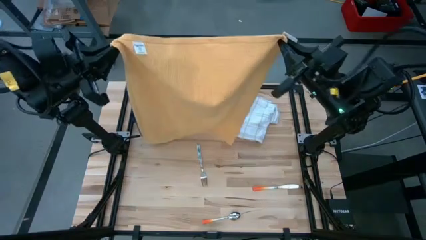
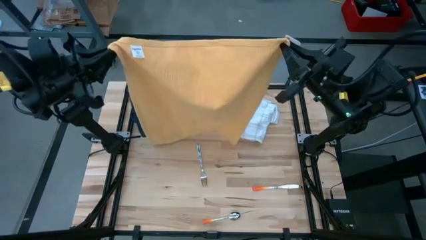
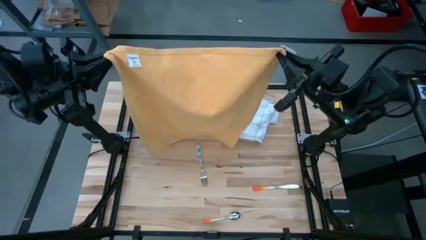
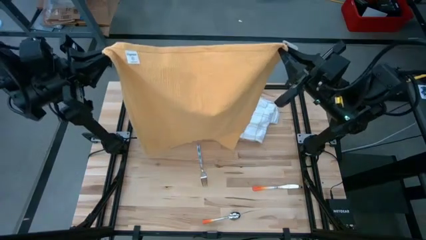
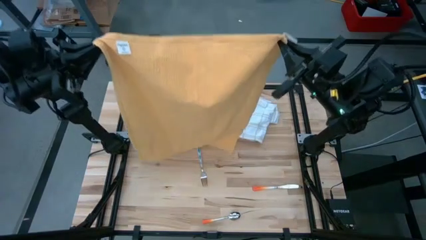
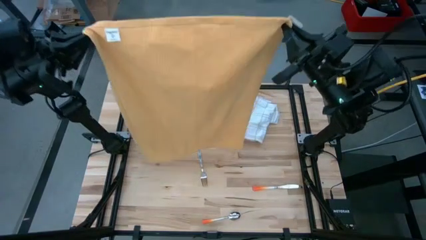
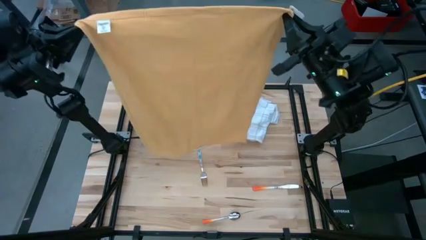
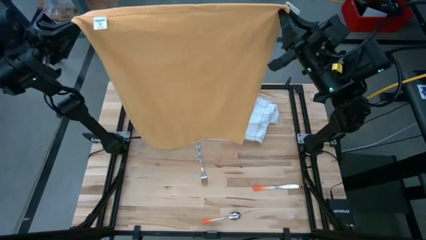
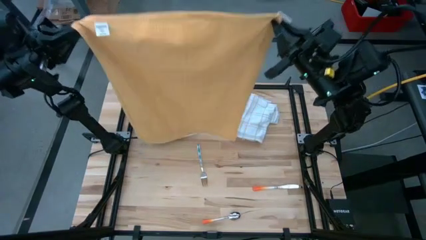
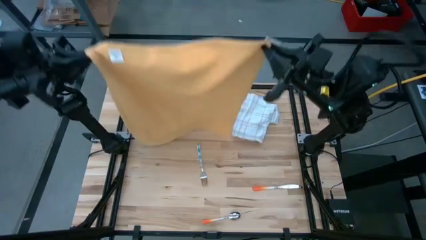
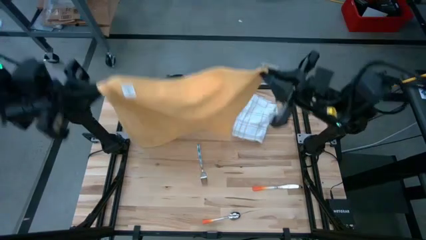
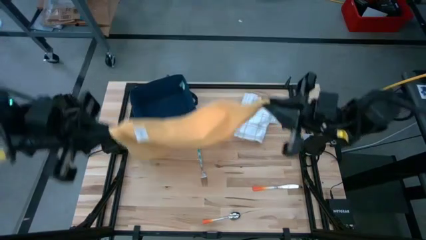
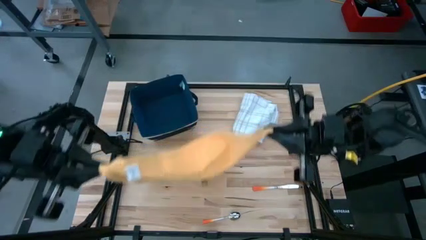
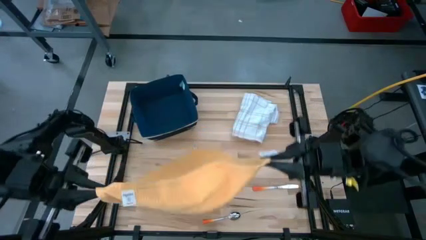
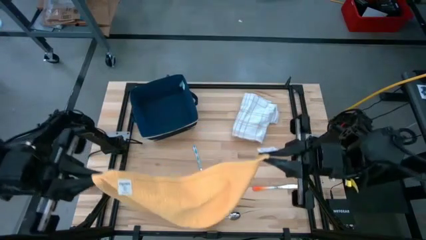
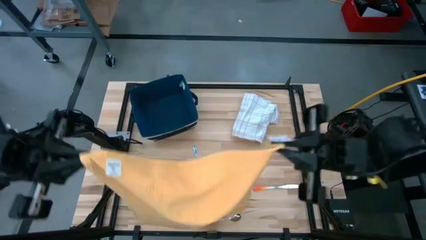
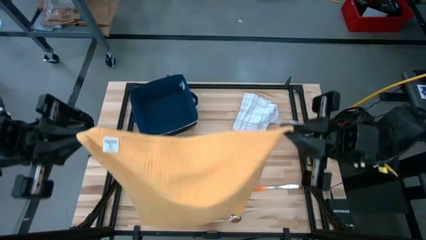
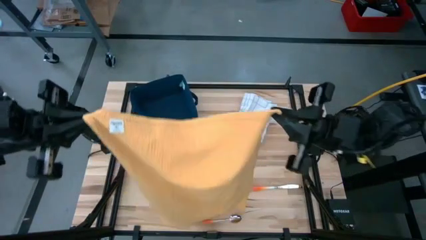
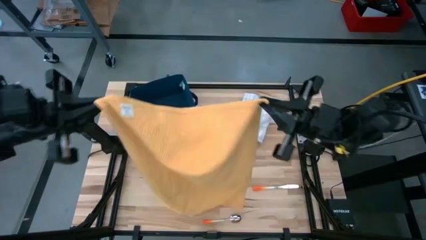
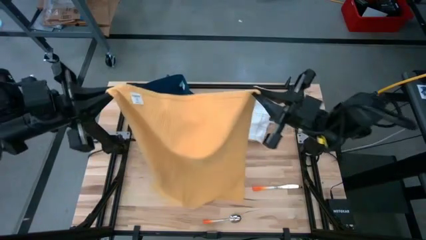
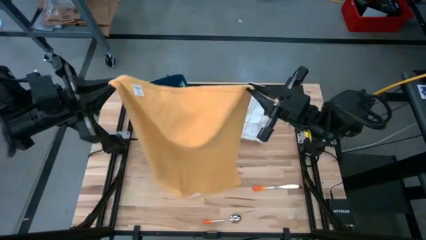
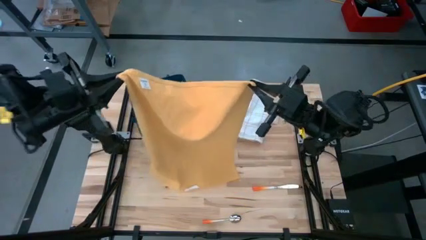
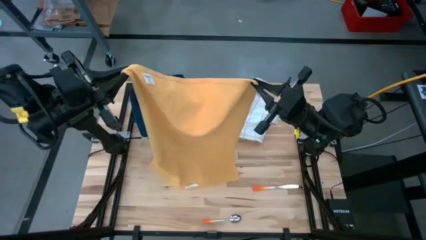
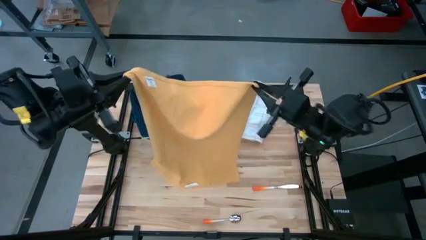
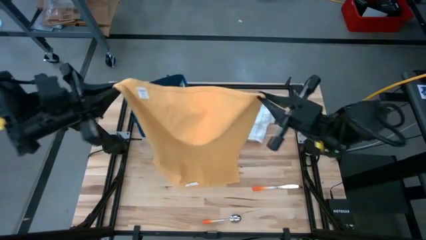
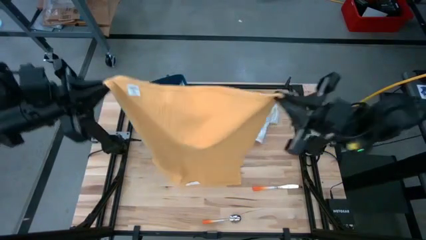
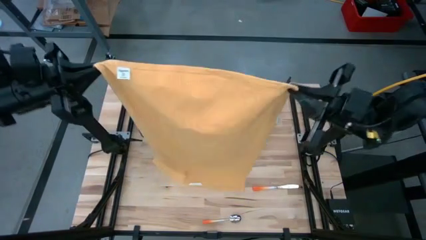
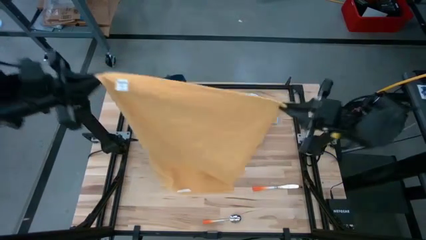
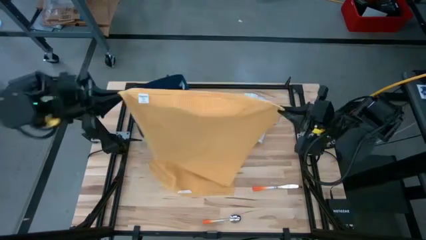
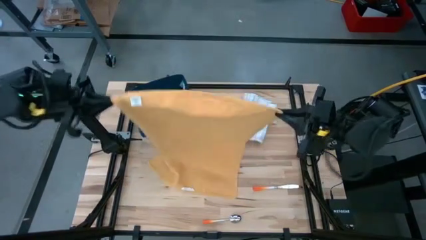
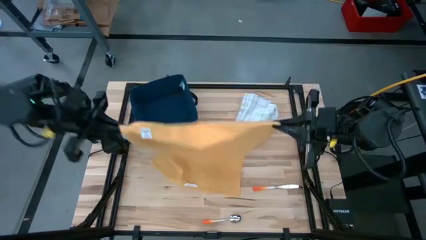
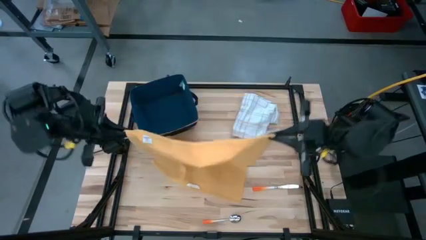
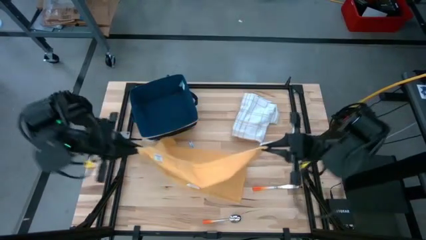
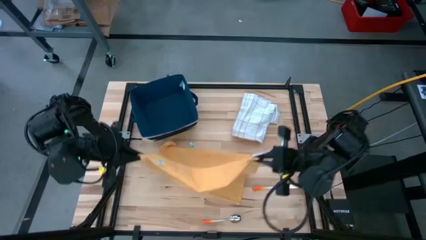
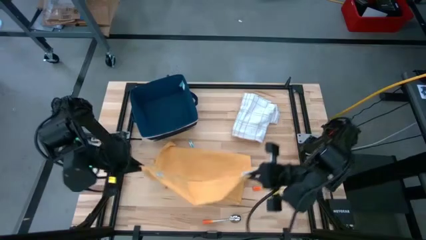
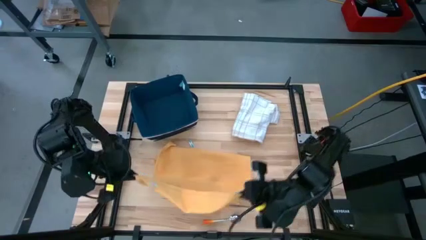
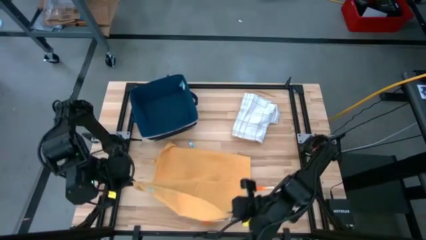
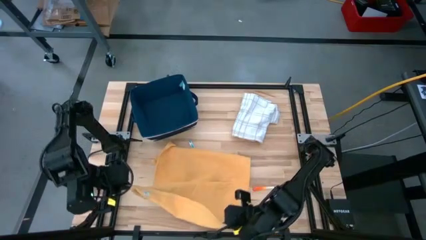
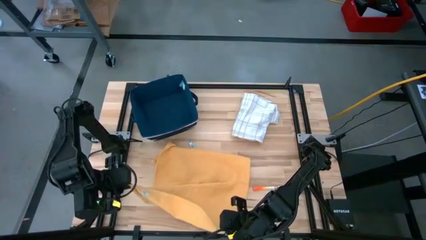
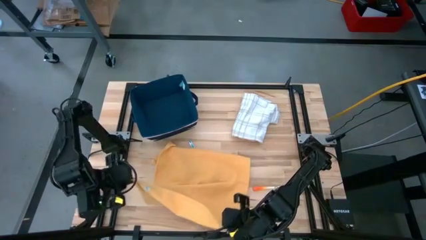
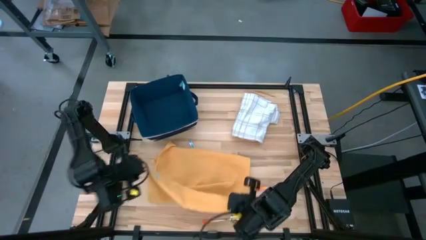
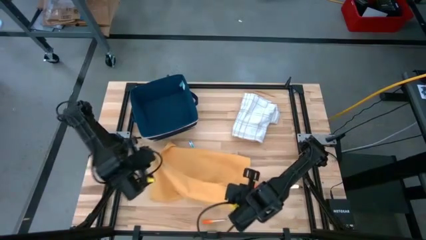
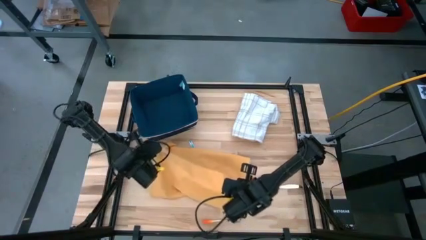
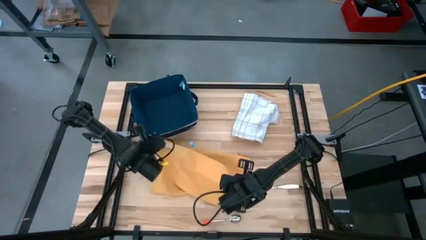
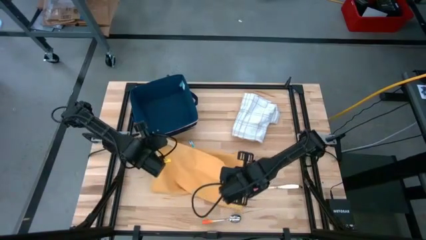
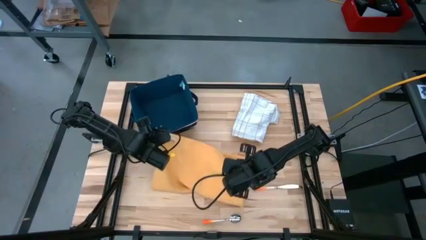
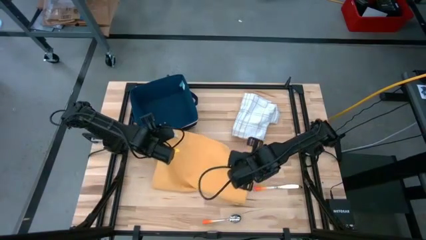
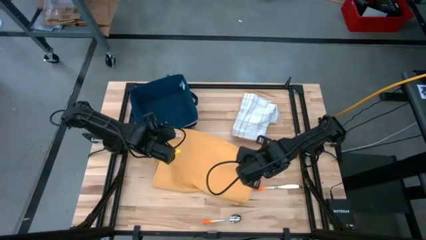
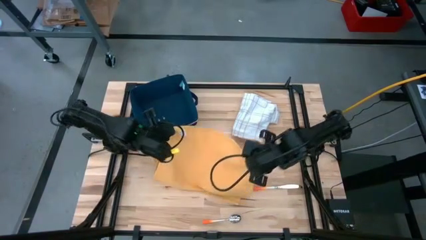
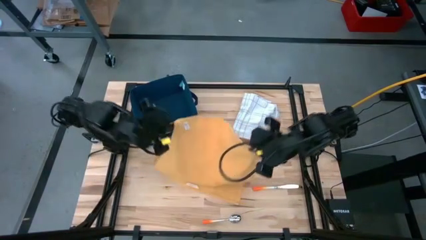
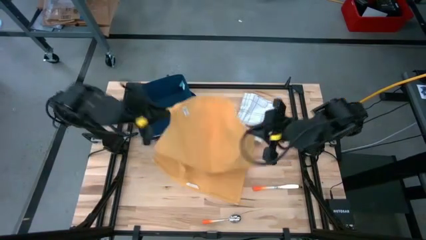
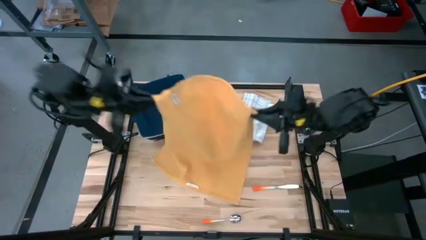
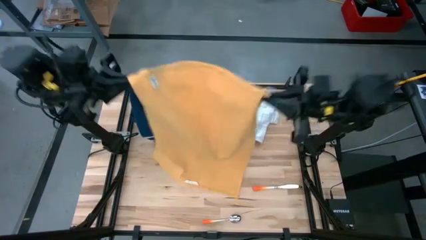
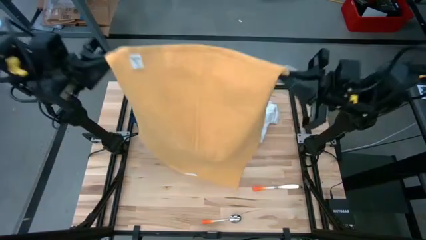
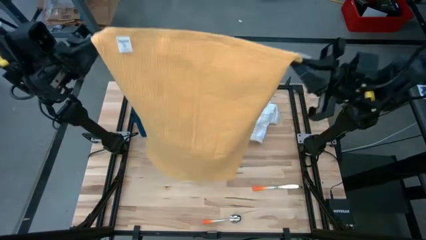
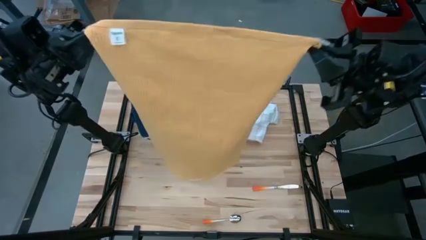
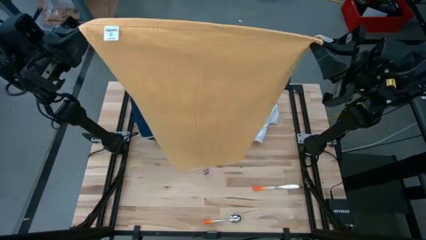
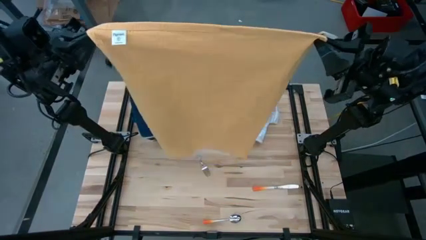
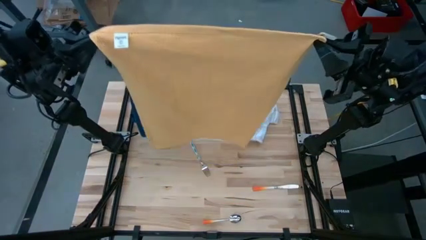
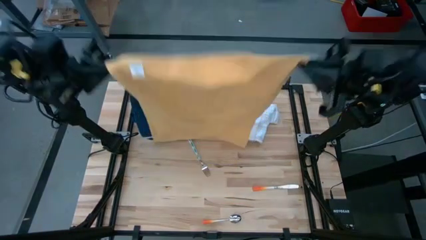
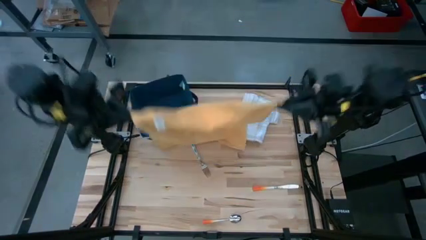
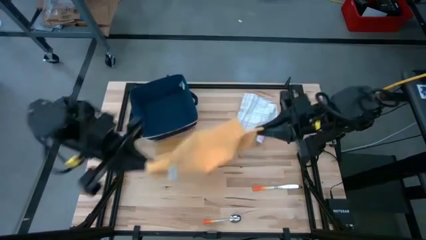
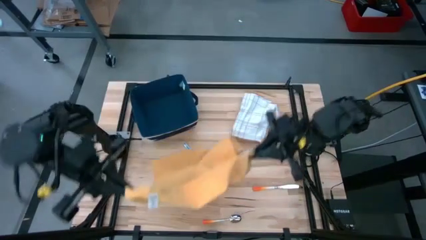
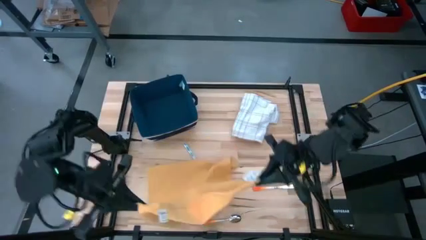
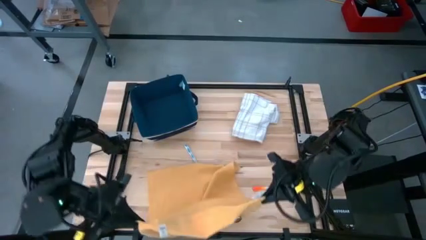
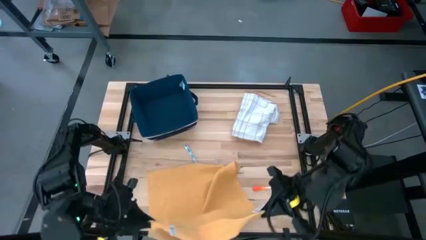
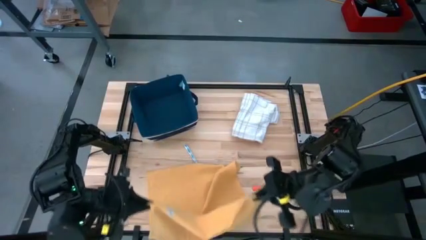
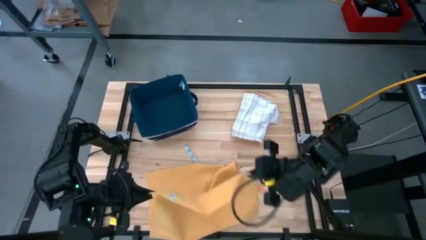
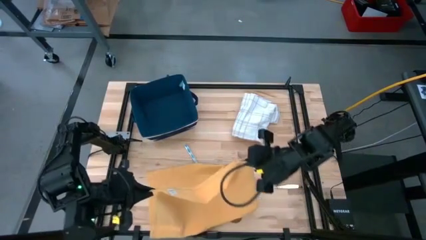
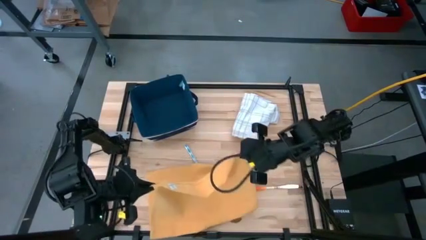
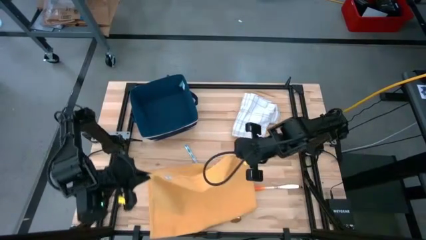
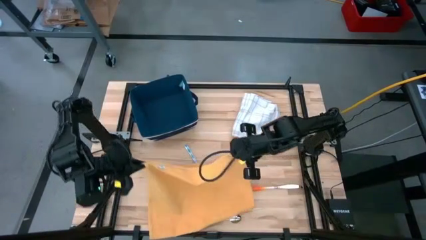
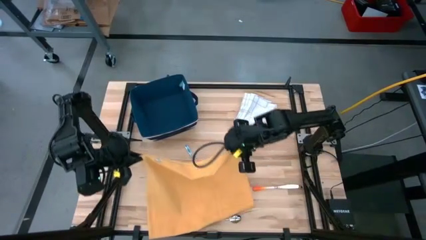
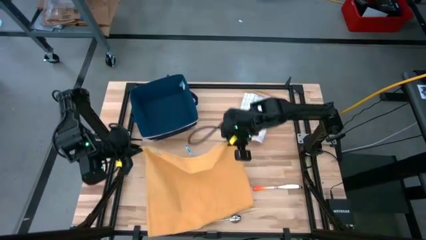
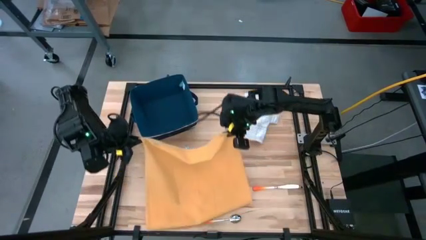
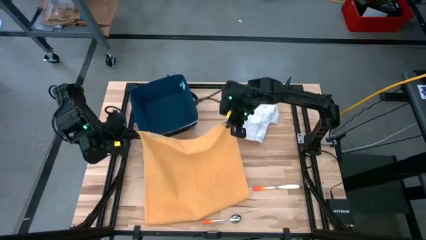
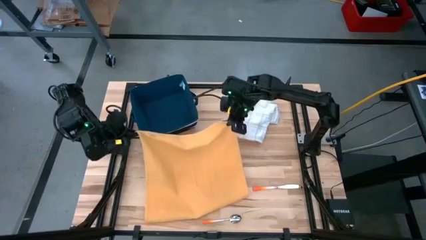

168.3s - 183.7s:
Task: Fold towel
Fold the yellow towel
